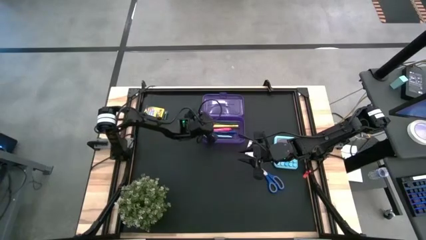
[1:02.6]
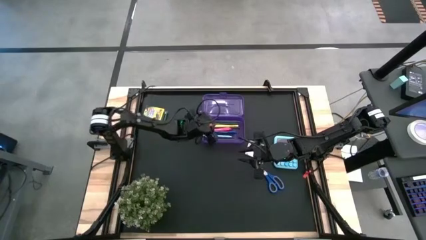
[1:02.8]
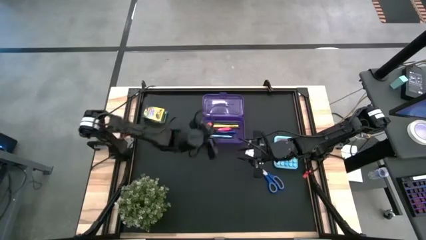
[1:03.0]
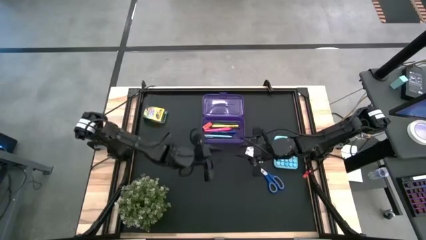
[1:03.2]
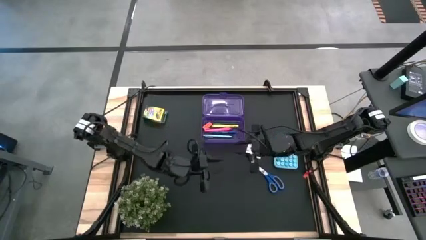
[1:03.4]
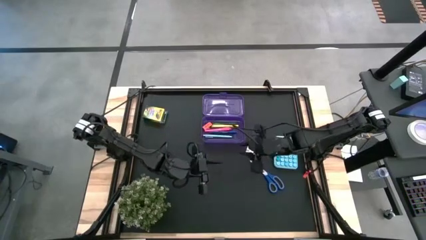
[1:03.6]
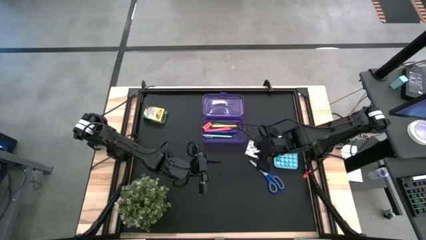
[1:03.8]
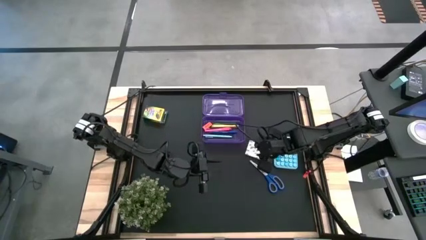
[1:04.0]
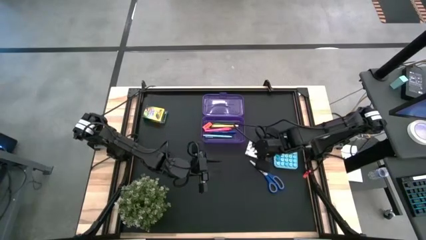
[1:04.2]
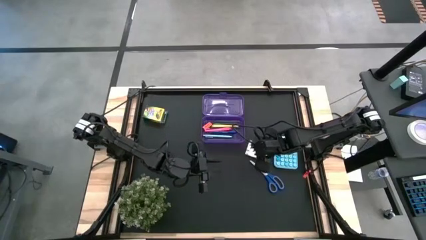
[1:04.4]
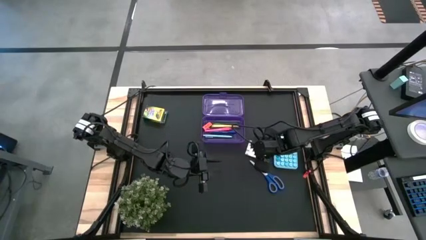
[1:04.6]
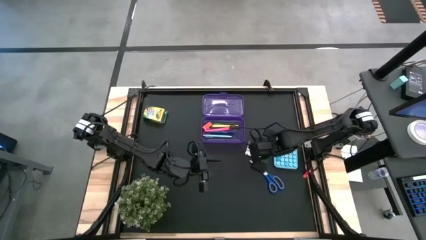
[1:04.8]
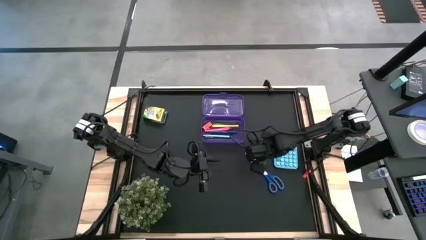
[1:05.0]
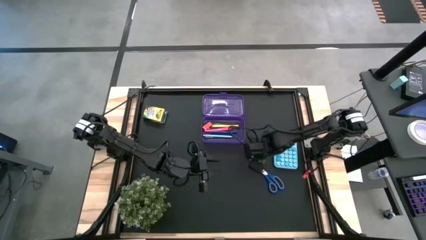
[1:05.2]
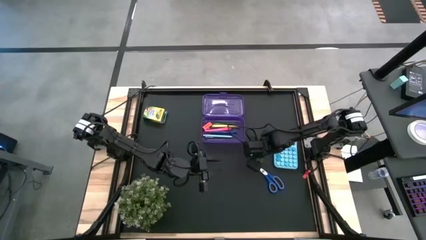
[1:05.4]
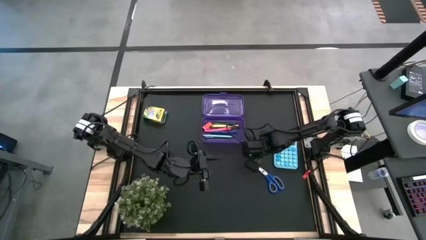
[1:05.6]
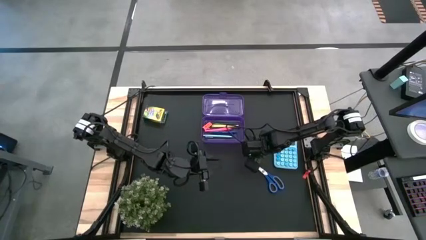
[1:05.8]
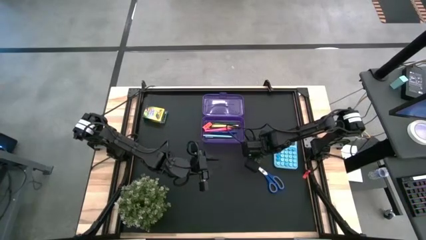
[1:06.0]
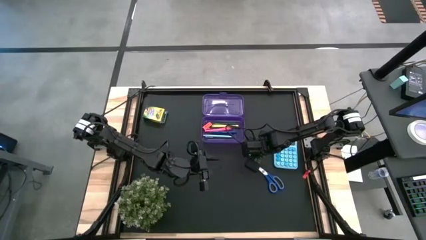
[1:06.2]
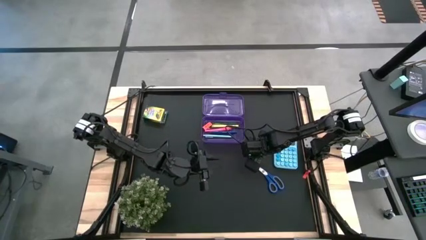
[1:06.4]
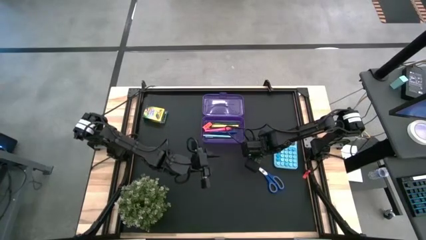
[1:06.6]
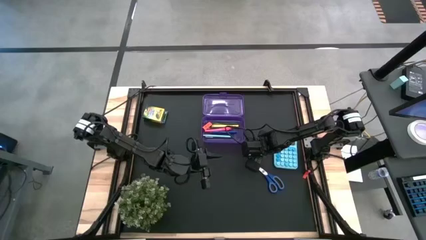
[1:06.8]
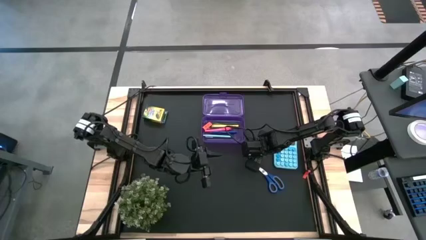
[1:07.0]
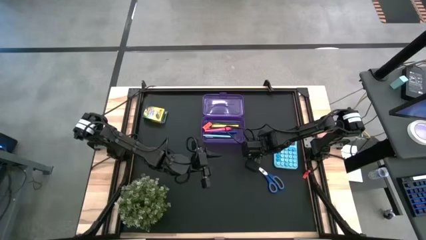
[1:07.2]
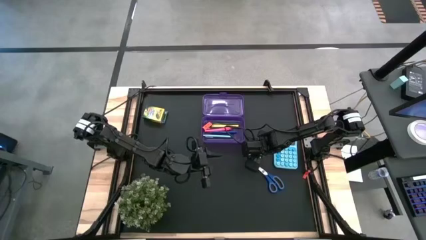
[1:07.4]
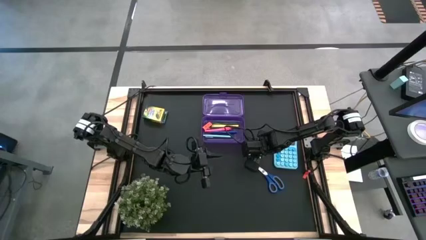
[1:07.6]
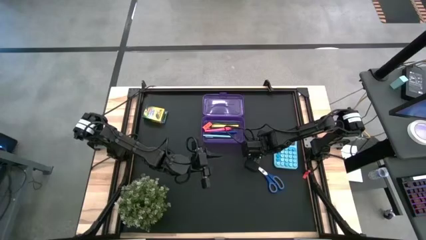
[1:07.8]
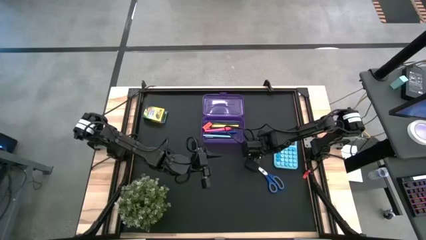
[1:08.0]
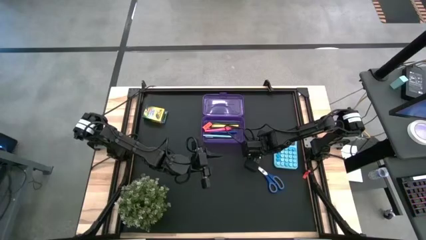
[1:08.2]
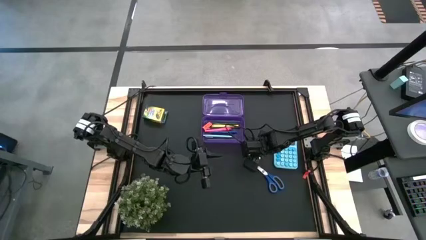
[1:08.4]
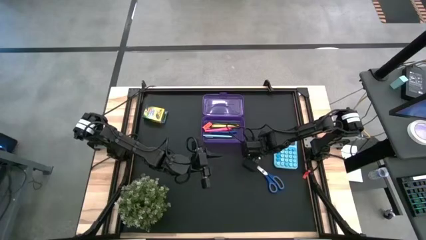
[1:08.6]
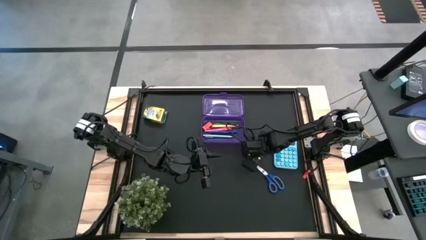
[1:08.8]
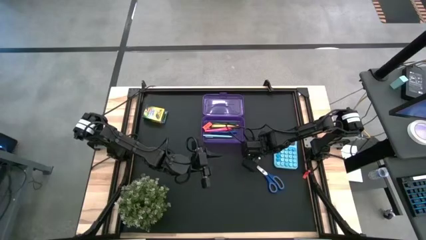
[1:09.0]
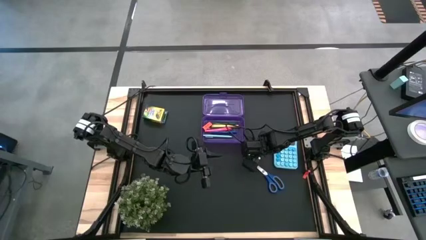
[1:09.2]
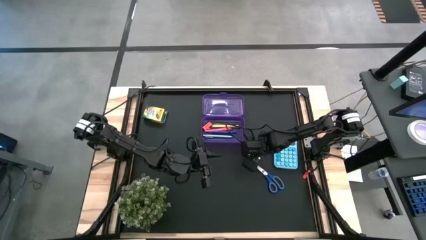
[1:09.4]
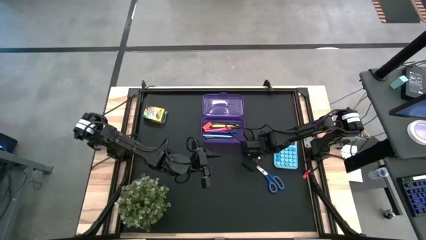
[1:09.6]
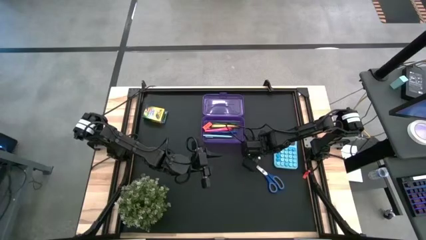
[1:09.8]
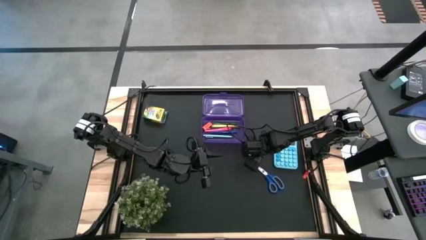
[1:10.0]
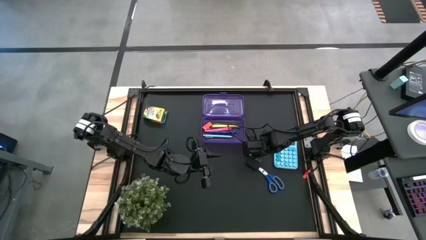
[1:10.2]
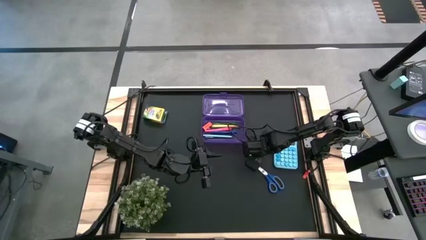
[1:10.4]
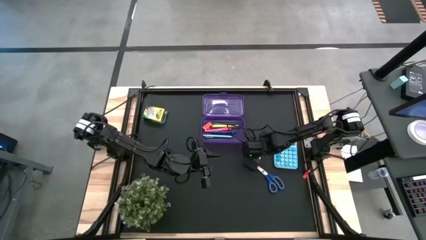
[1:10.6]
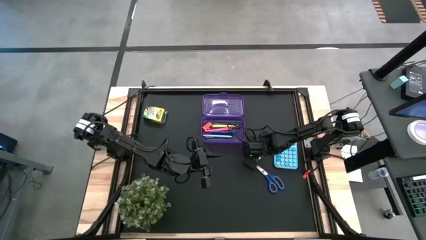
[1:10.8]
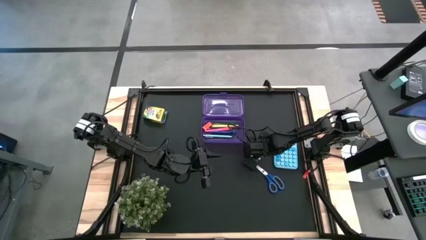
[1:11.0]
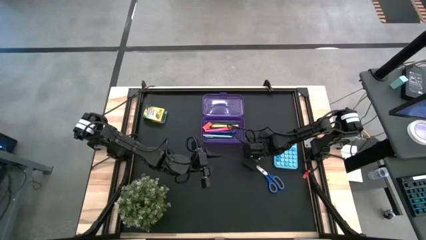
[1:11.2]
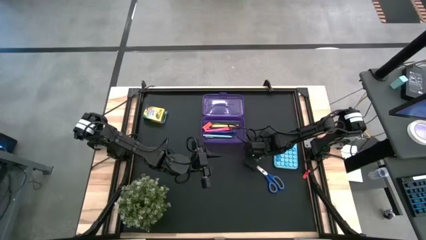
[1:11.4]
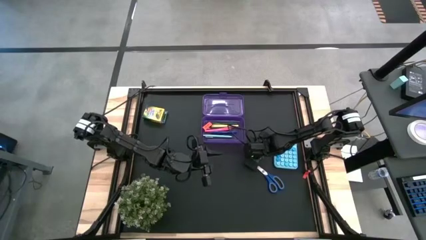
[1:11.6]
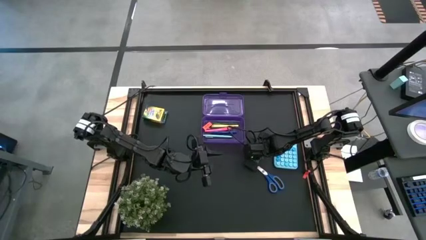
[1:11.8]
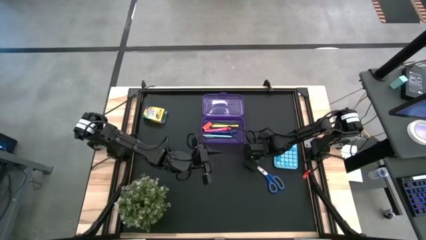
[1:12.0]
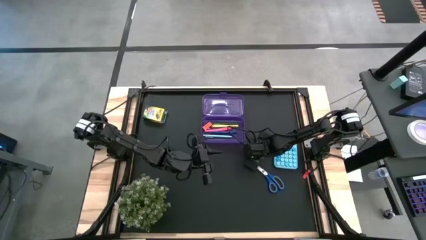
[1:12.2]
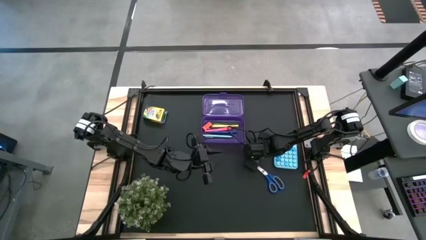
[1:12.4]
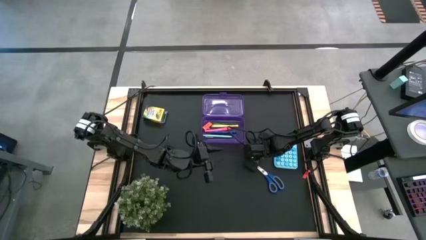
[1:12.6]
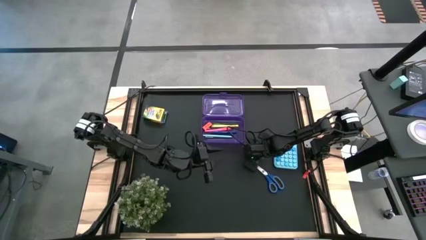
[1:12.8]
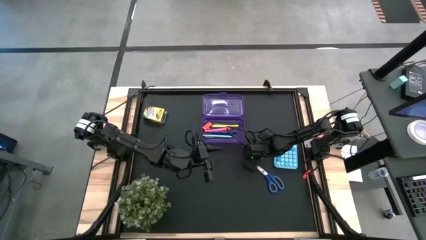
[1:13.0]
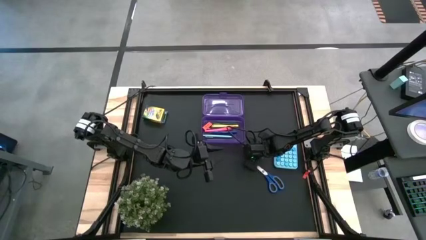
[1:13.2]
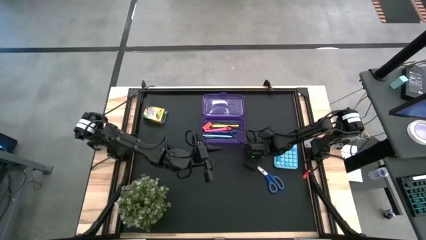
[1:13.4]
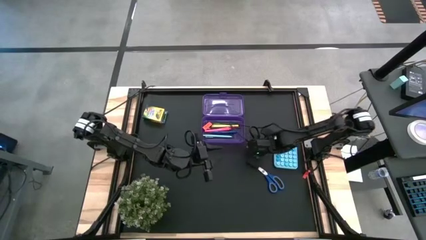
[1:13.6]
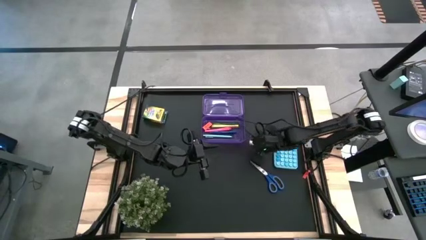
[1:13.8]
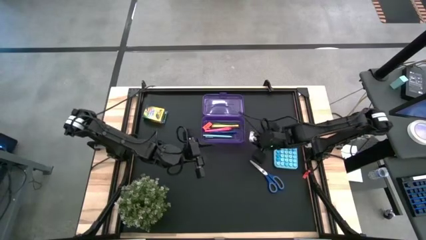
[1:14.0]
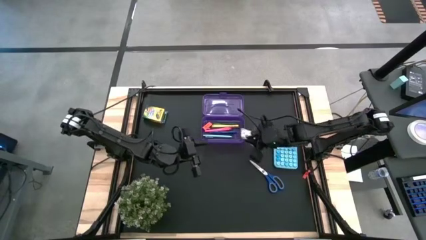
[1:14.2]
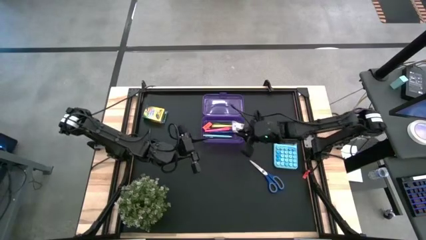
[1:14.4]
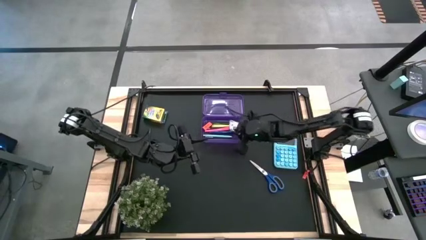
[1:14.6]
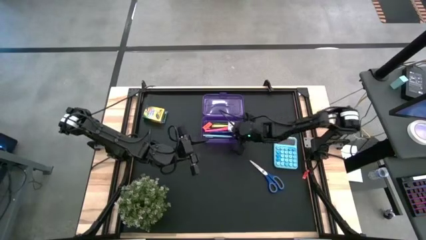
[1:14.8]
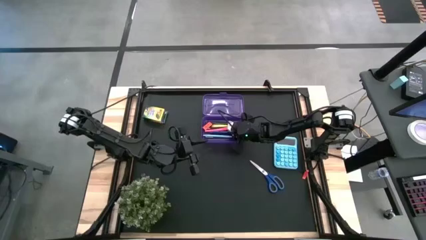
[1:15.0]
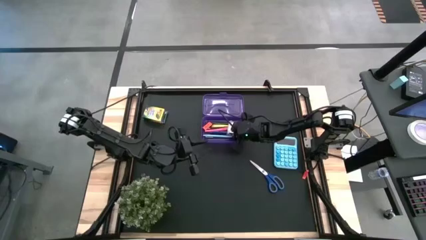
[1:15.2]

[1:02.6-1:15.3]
Task: Pack school essentials
Put the white notepad into the purple box

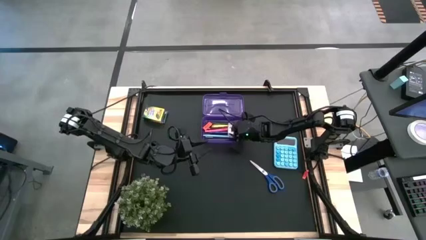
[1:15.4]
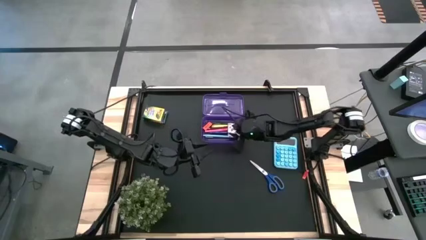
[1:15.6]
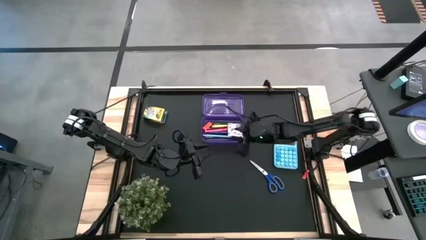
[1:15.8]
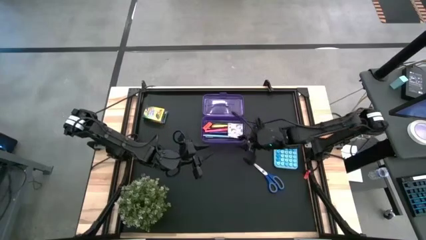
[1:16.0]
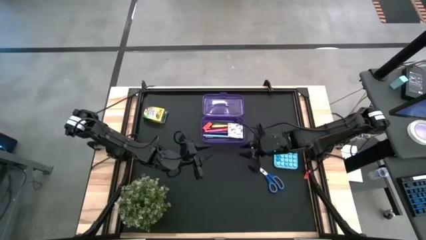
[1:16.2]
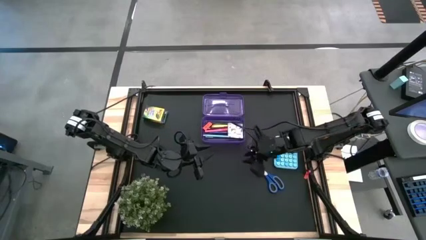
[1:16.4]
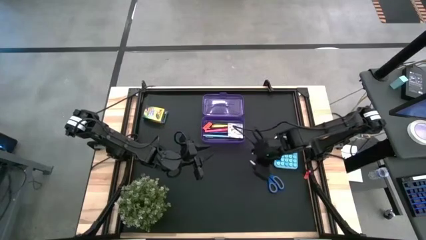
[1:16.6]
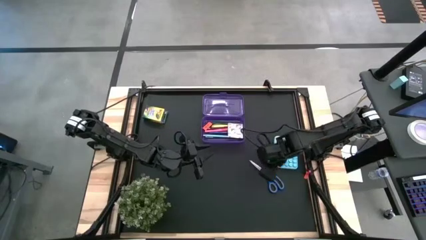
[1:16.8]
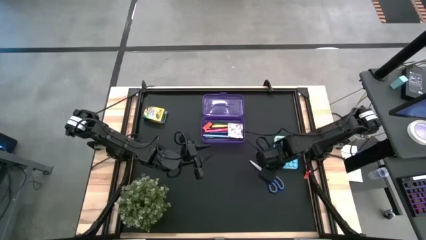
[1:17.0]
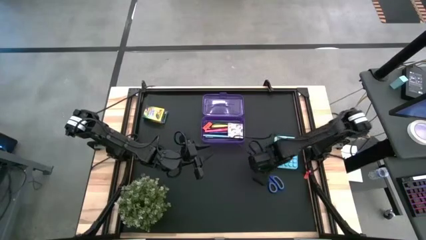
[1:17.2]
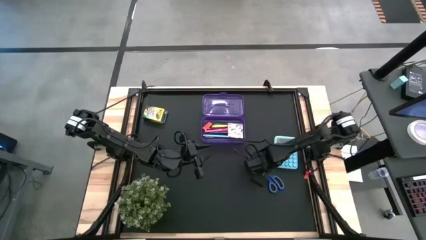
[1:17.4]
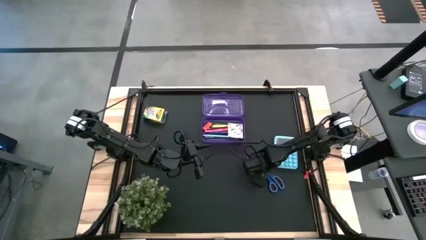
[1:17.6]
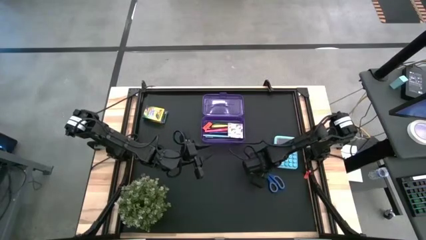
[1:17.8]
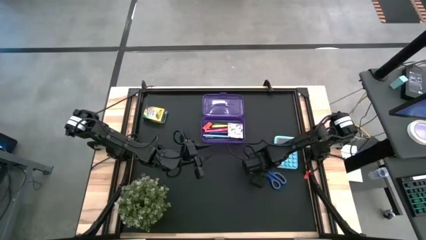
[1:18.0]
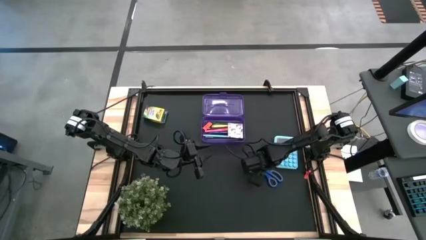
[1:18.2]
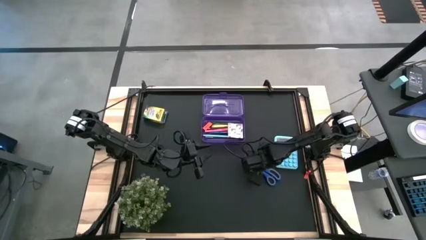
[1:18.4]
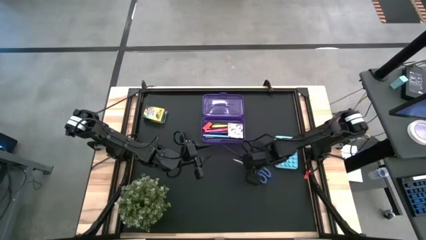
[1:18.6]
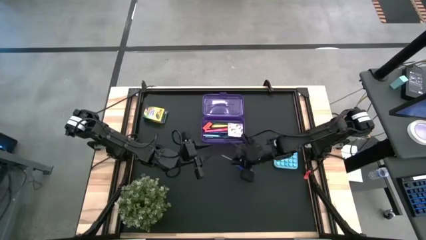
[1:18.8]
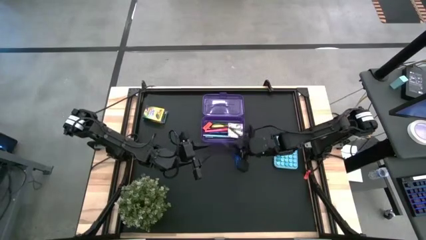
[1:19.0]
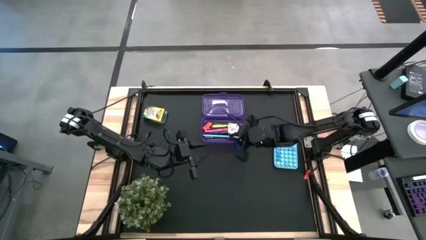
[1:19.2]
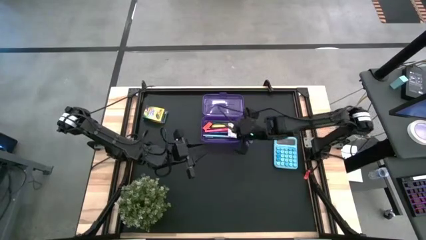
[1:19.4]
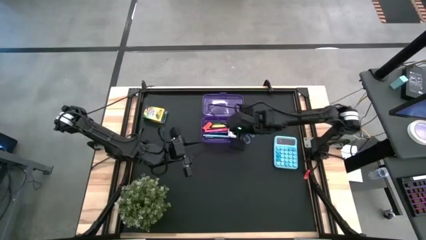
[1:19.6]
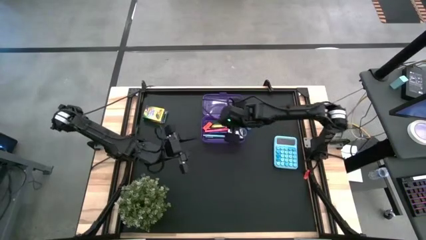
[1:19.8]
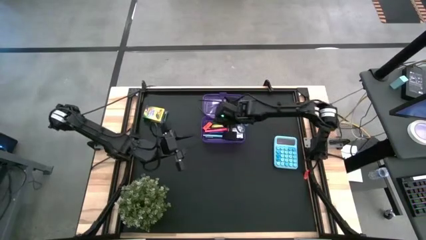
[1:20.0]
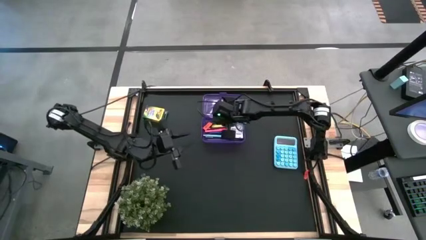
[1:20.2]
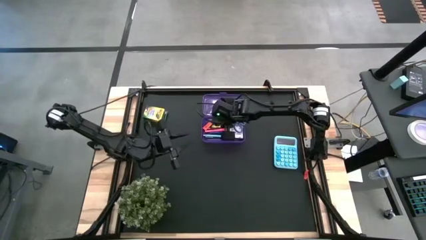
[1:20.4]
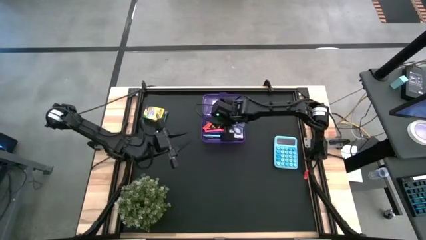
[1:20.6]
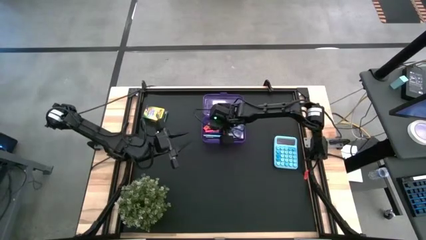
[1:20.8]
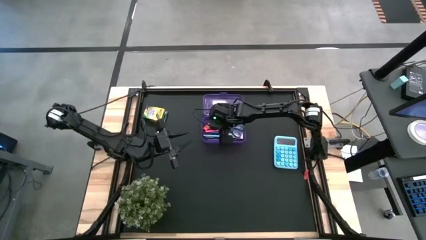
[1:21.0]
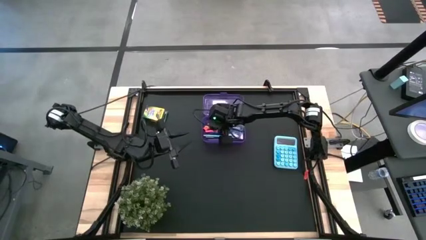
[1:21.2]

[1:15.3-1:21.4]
Put the blue scissors into the purple box
